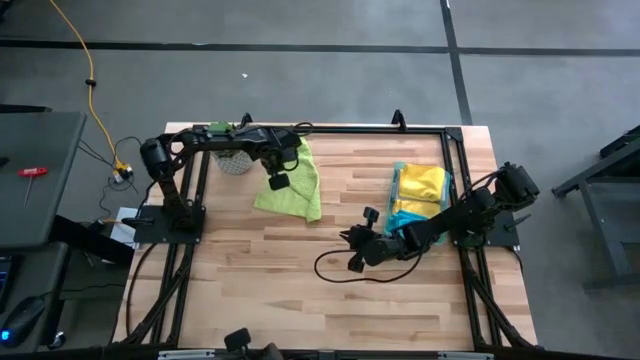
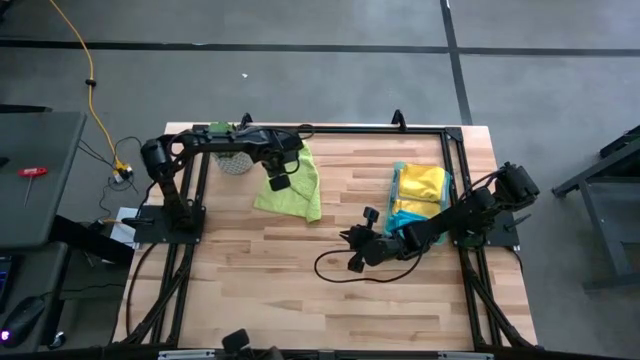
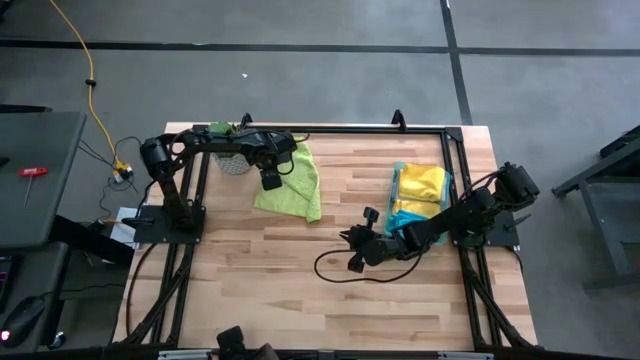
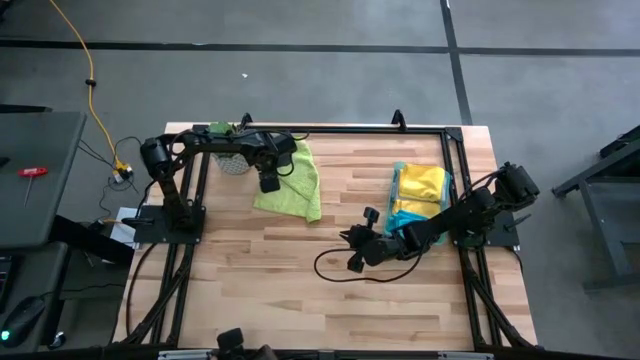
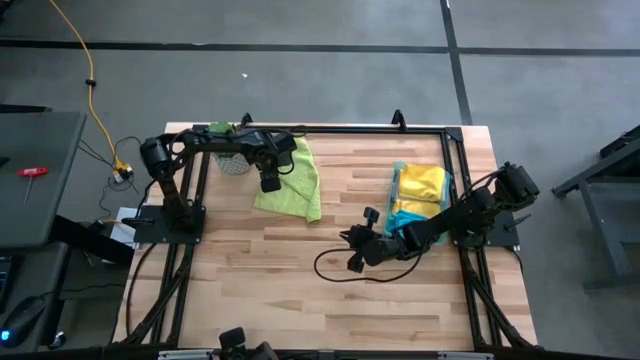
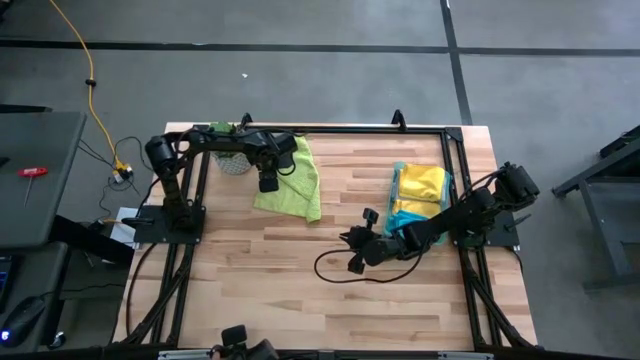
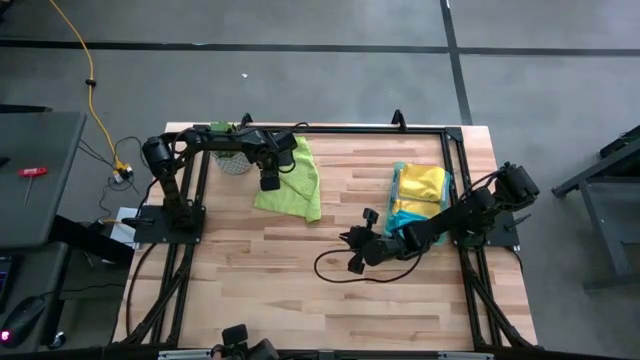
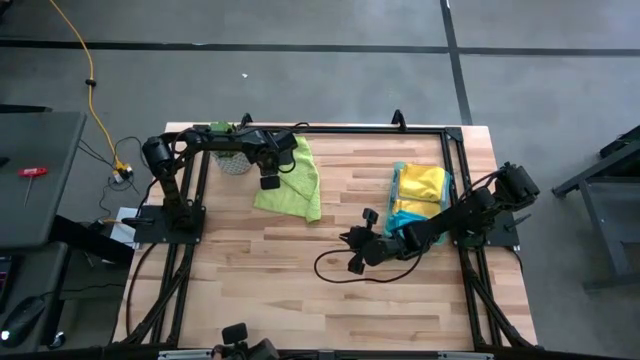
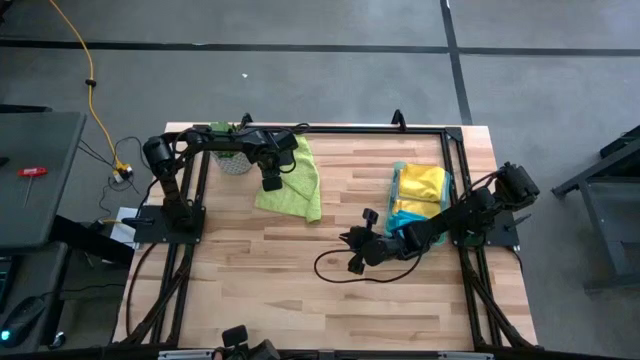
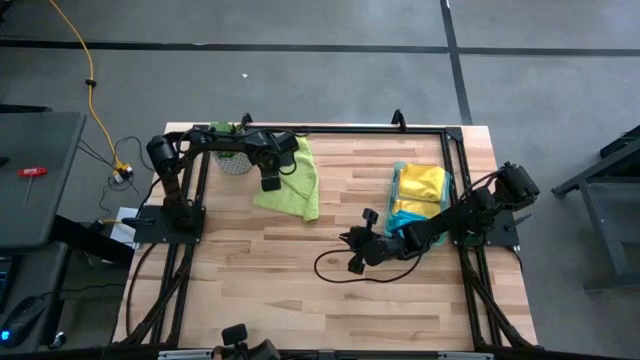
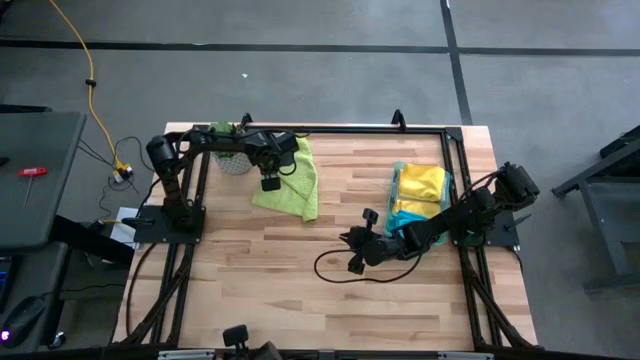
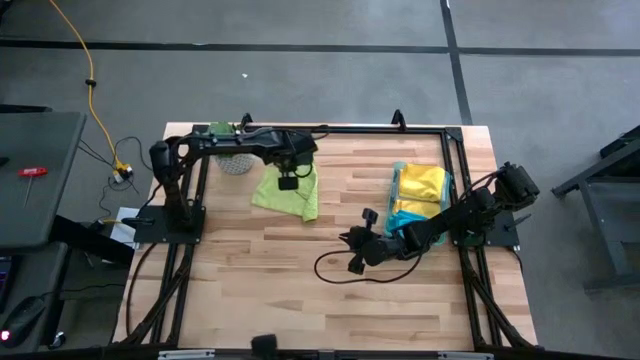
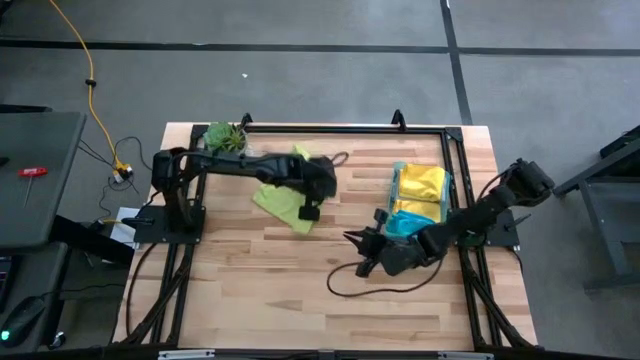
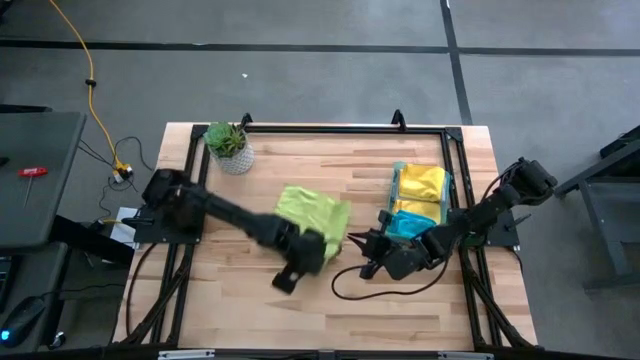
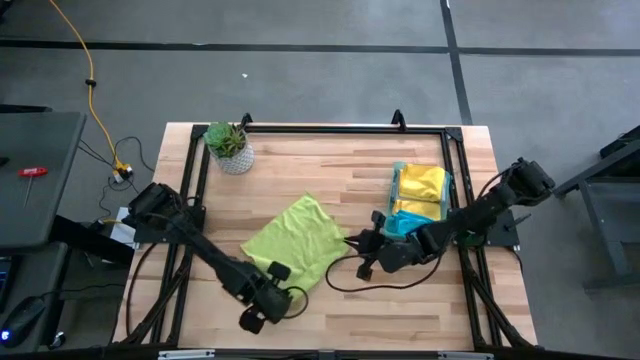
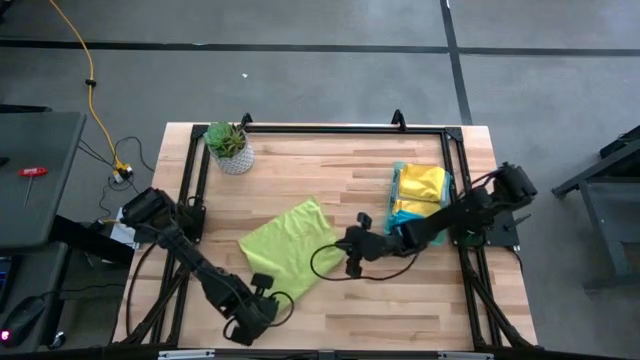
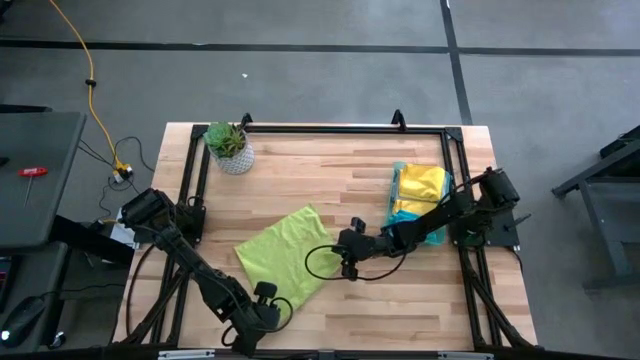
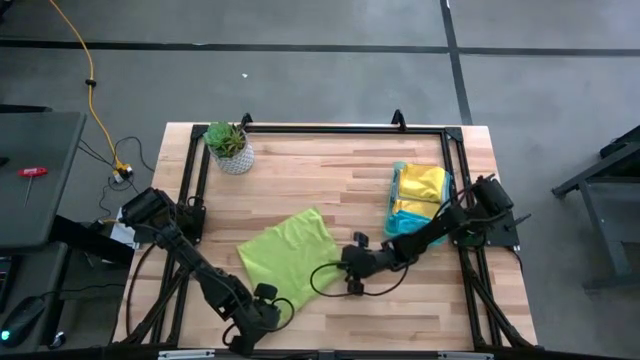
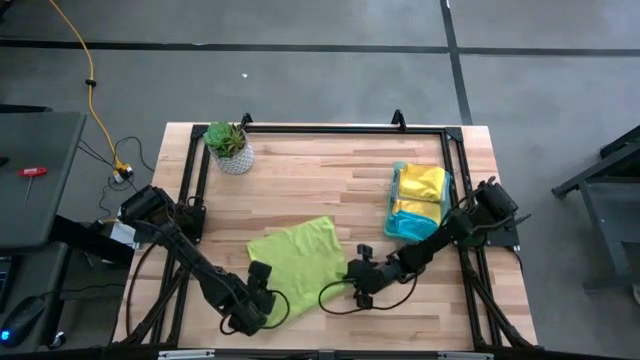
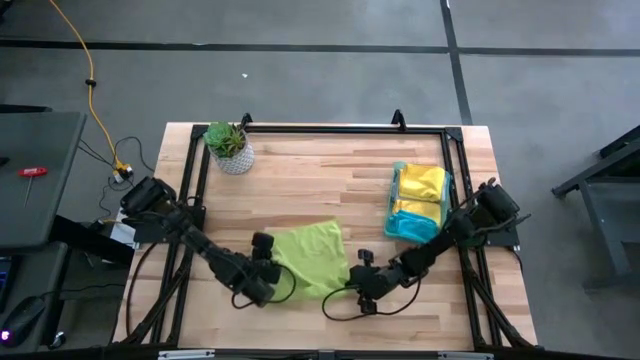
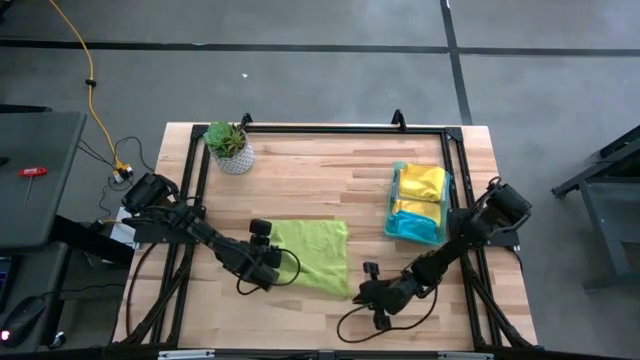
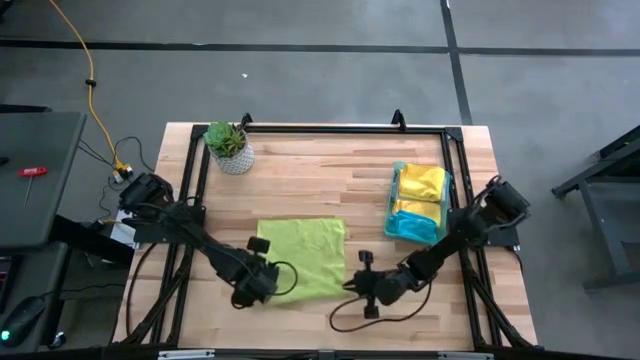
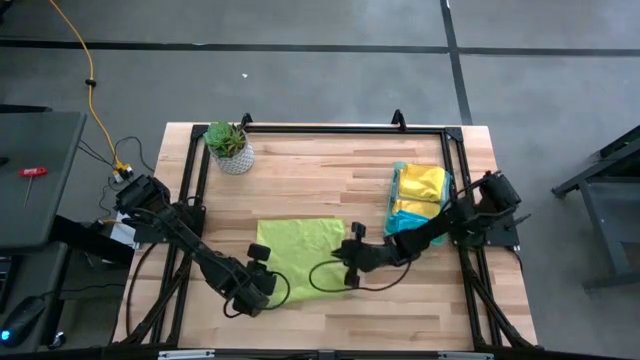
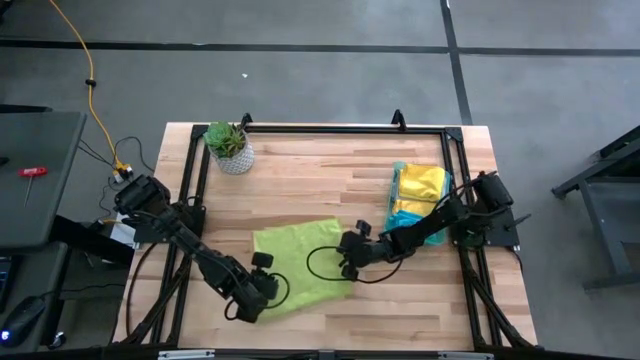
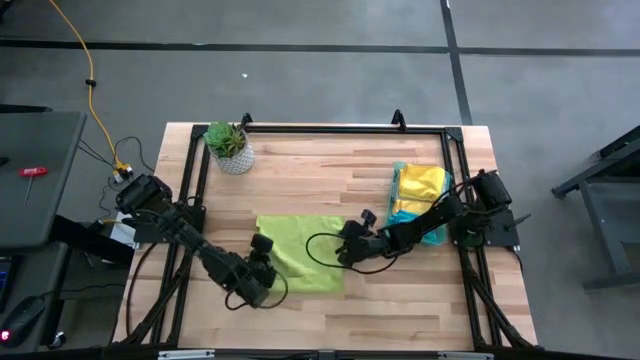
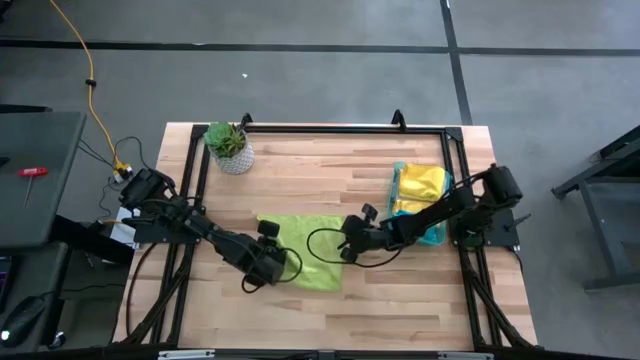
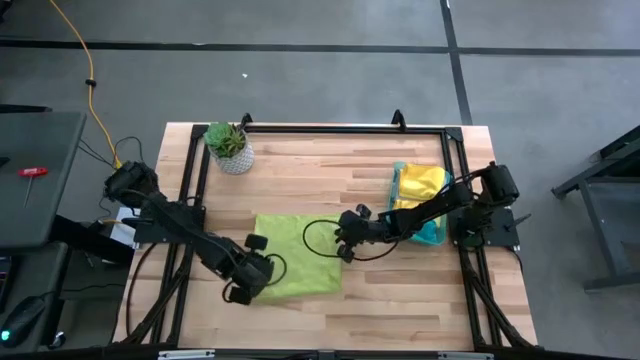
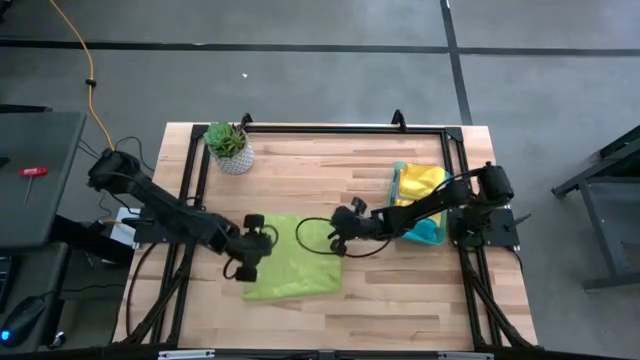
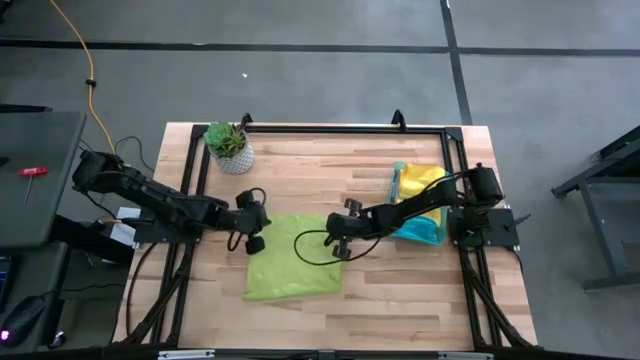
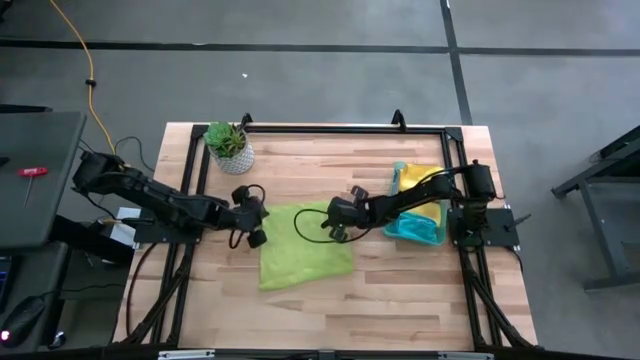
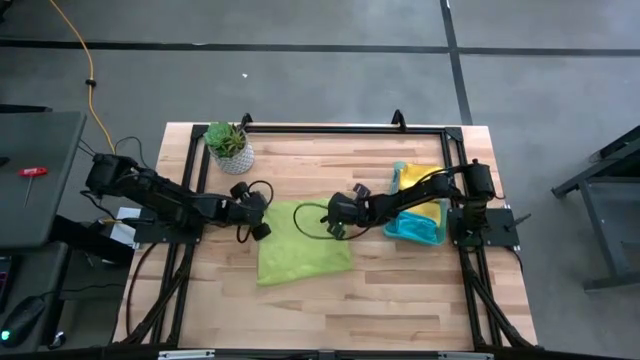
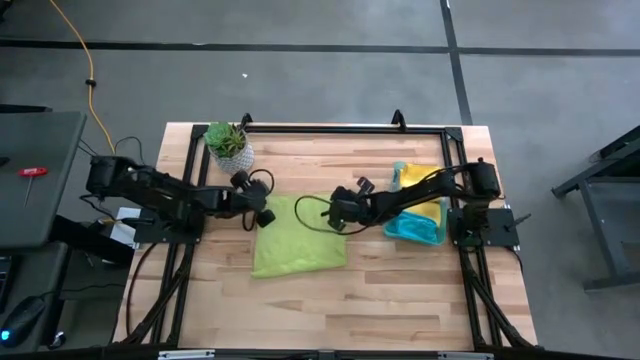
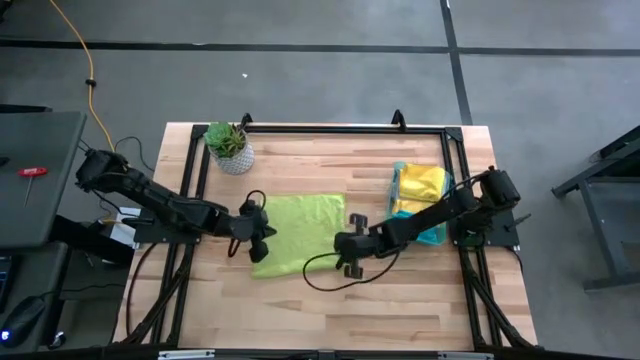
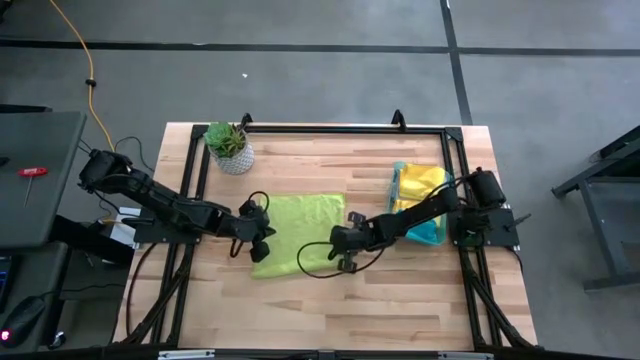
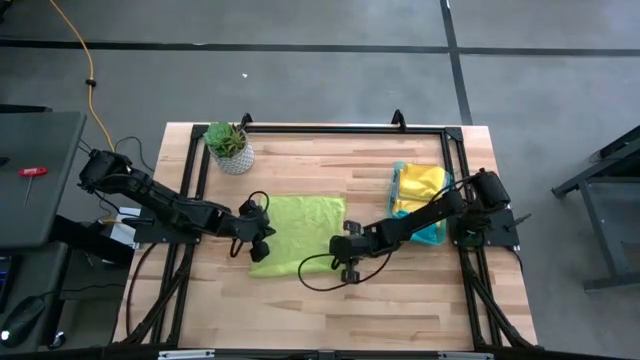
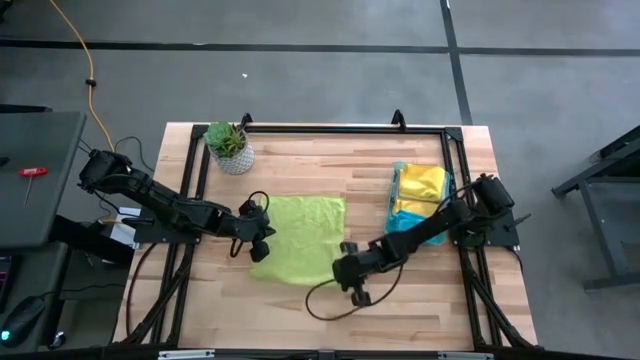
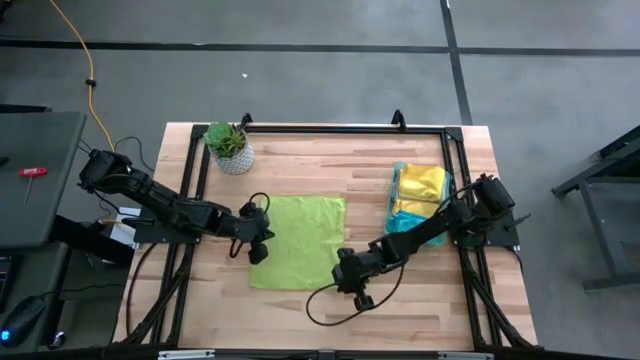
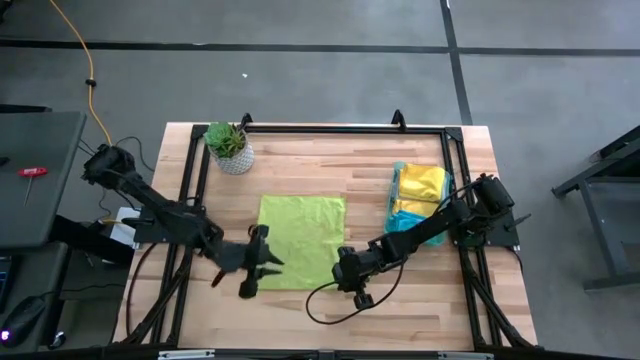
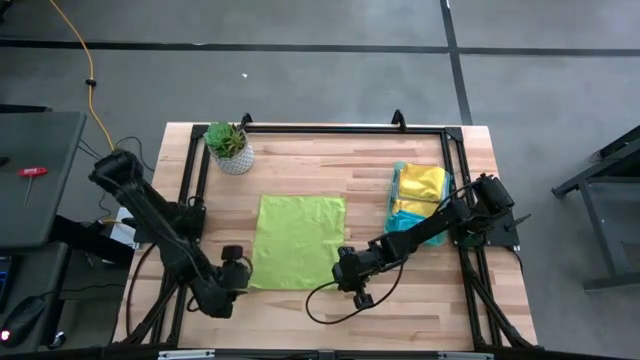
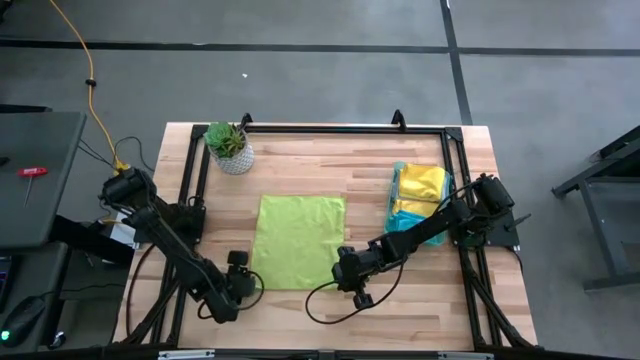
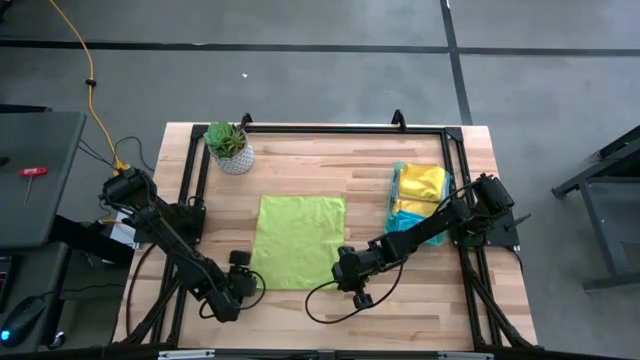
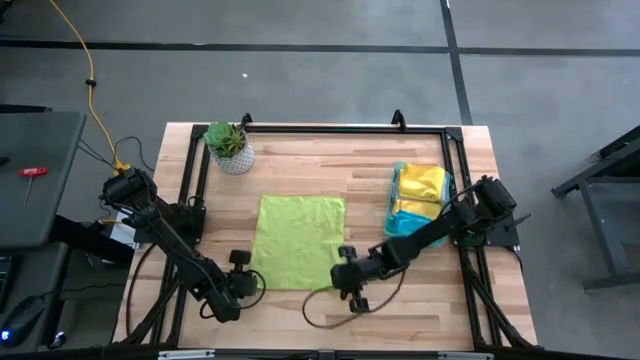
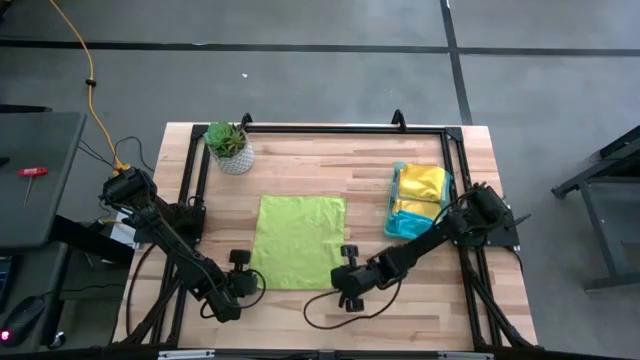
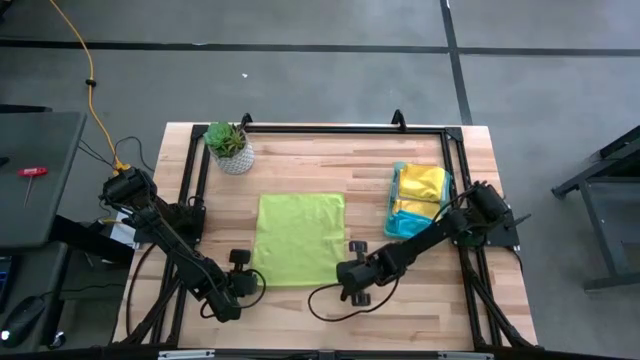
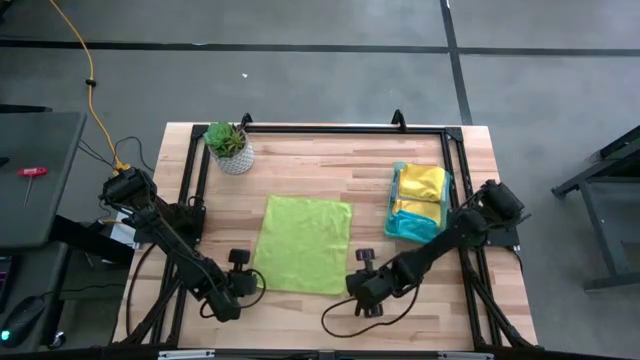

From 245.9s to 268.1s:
Task: Fold microfiber towels
Fold the green microfiber cloth
